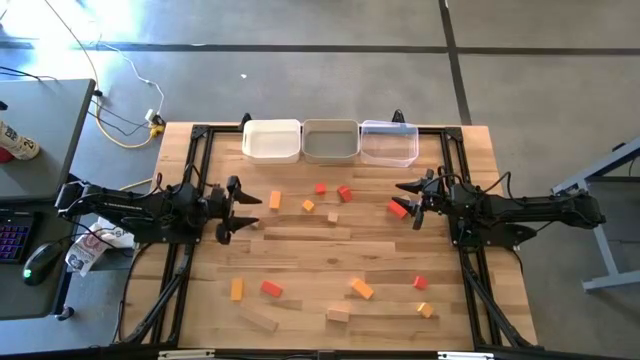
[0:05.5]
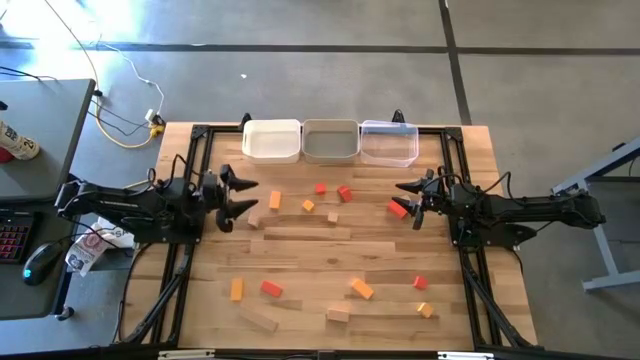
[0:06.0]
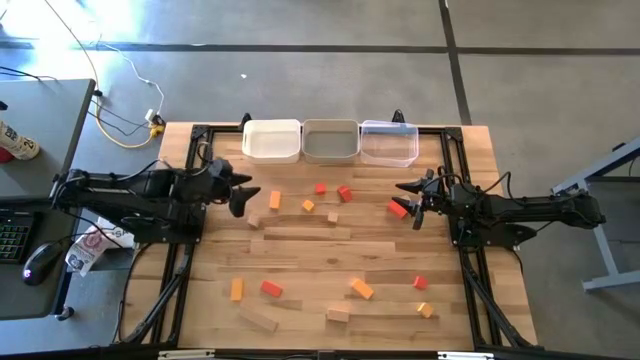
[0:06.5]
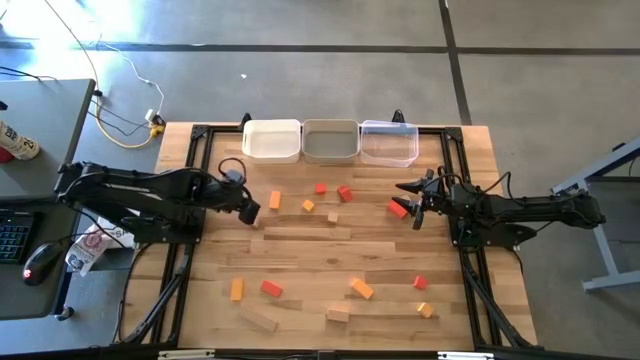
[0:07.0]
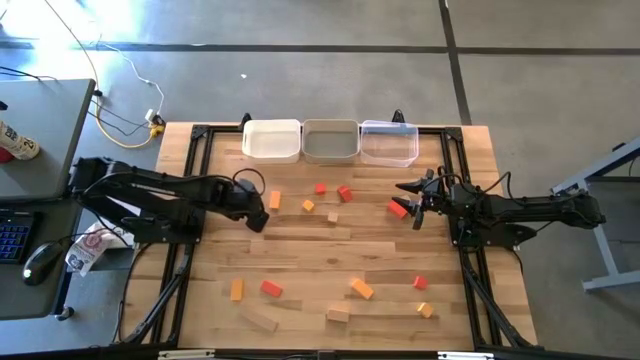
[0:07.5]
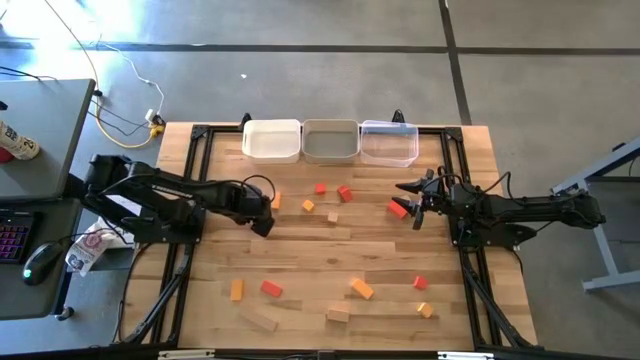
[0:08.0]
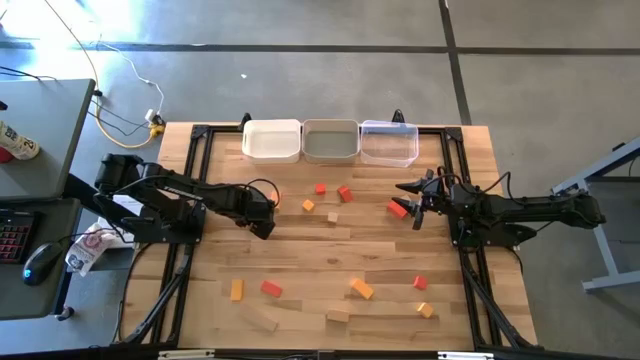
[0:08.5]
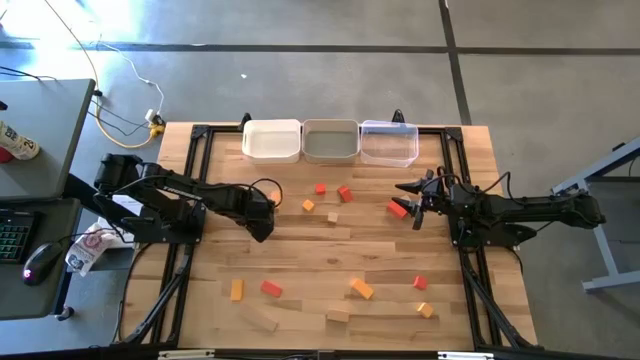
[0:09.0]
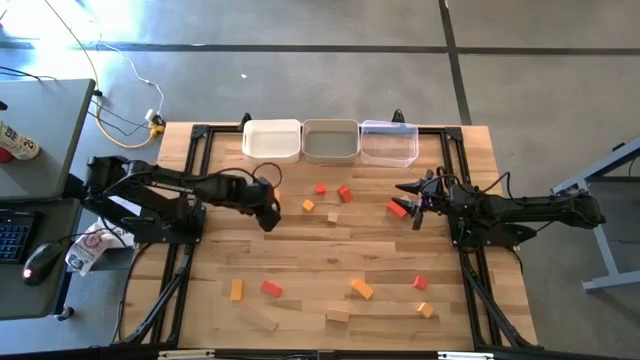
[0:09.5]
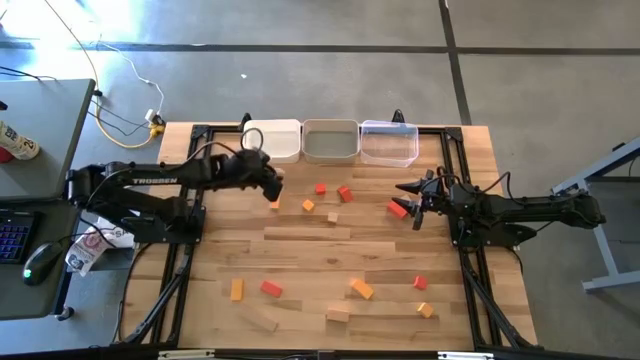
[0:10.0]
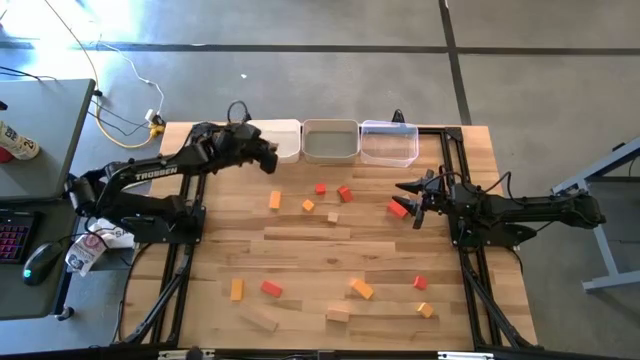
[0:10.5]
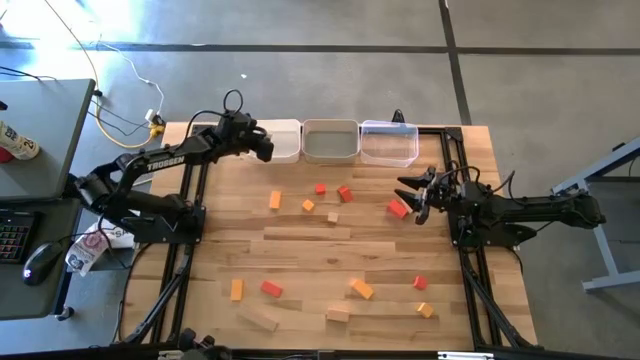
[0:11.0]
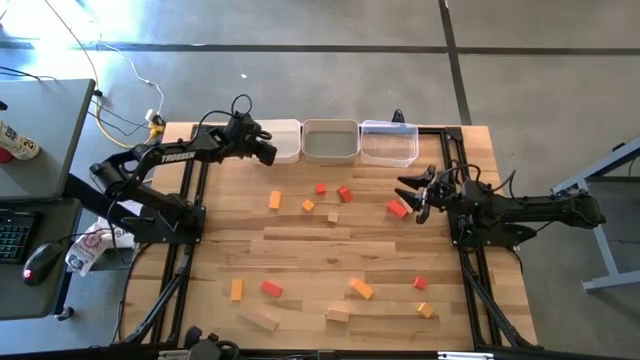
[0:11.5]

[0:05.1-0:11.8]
Task: Sort & place blocks by color
Put the brown block into the white bin

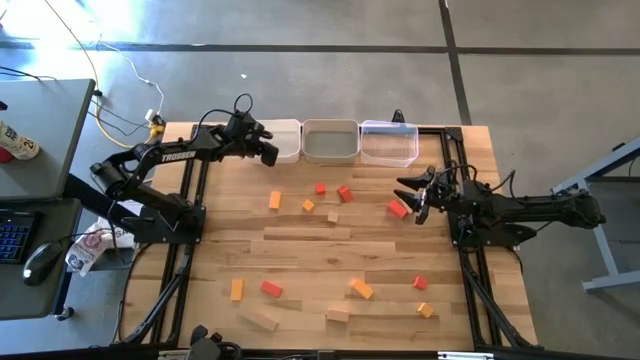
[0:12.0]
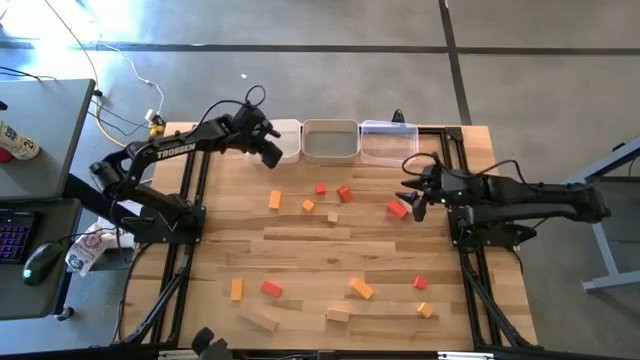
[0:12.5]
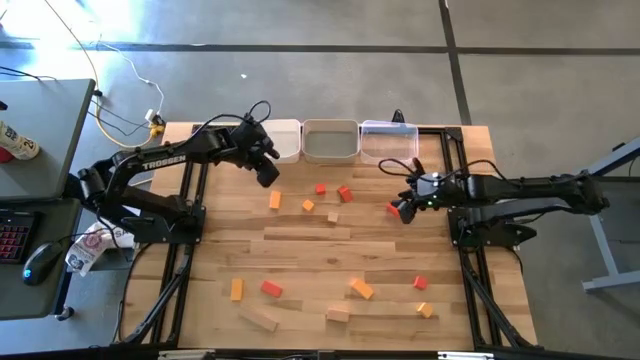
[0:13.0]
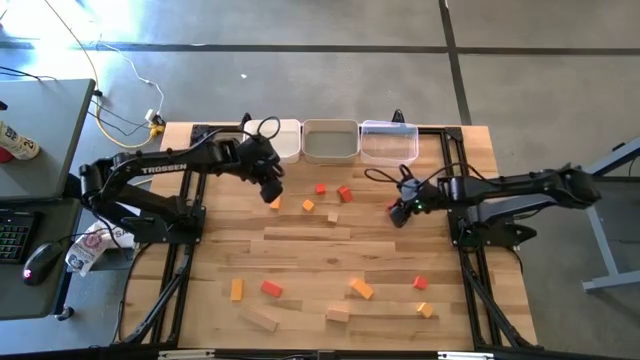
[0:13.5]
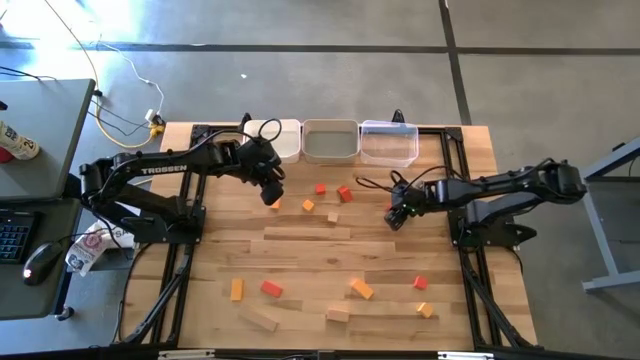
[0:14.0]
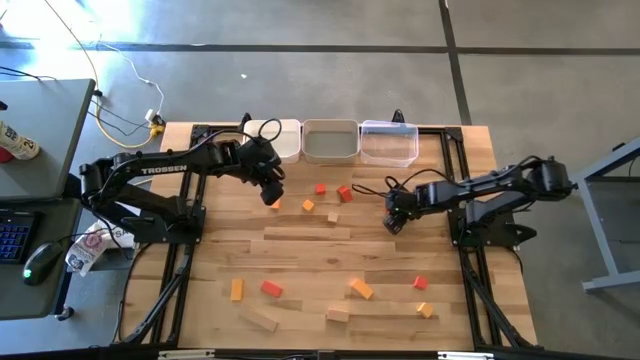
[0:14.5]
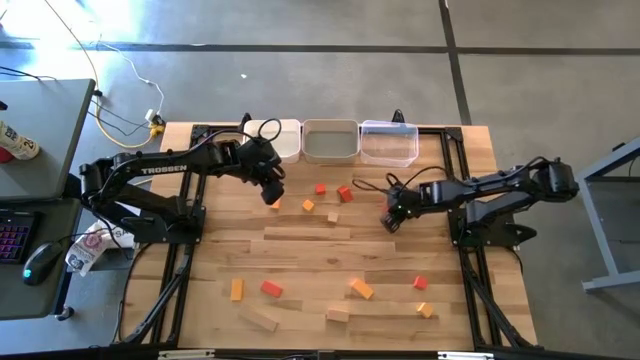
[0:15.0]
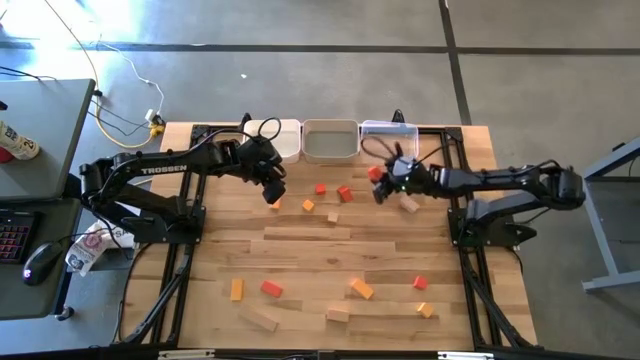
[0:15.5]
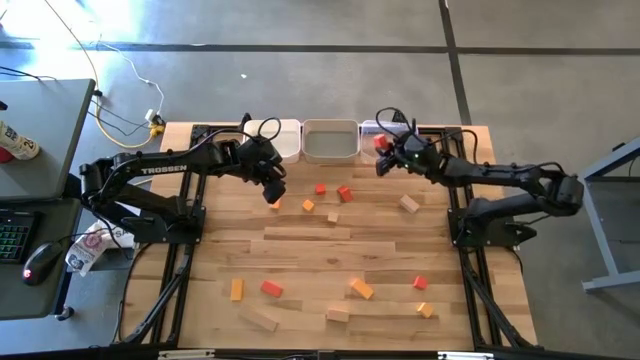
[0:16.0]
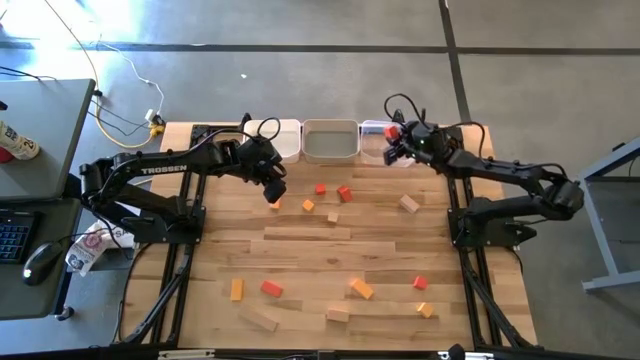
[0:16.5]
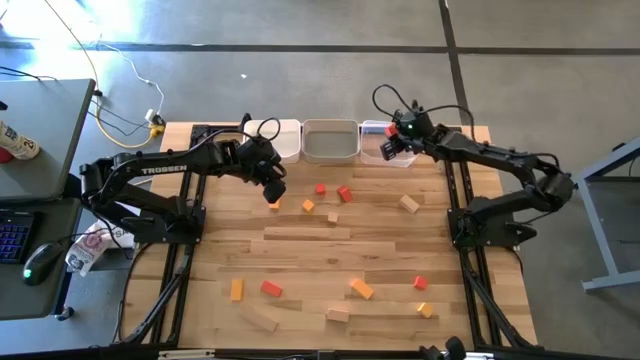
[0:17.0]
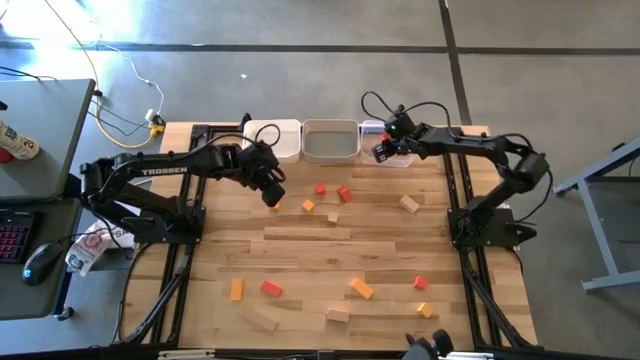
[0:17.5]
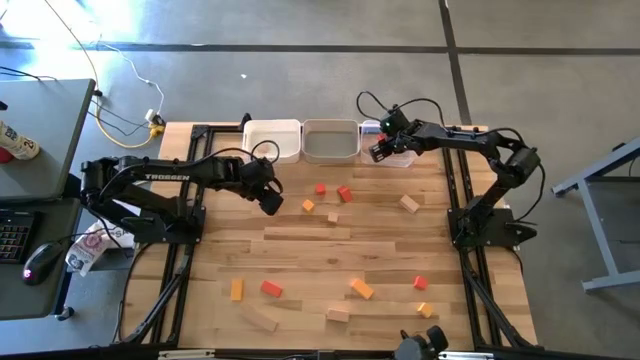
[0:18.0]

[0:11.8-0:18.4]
Put the orange block into the transparent bin

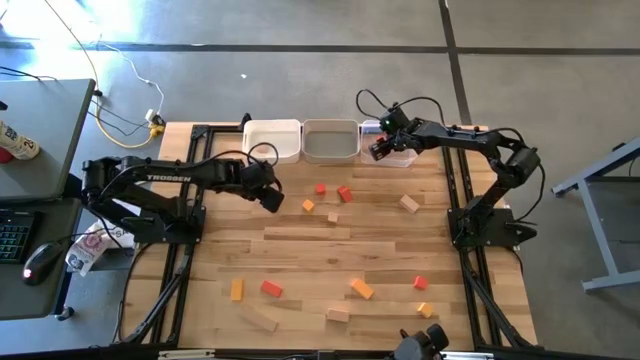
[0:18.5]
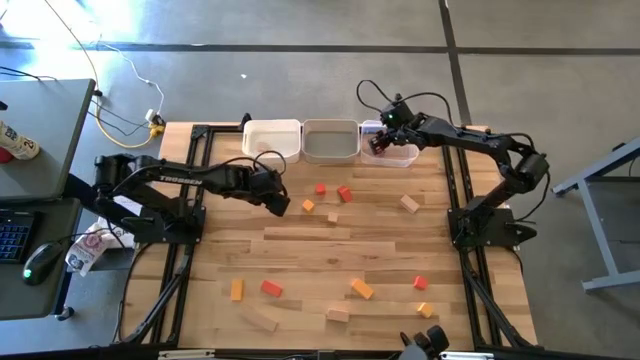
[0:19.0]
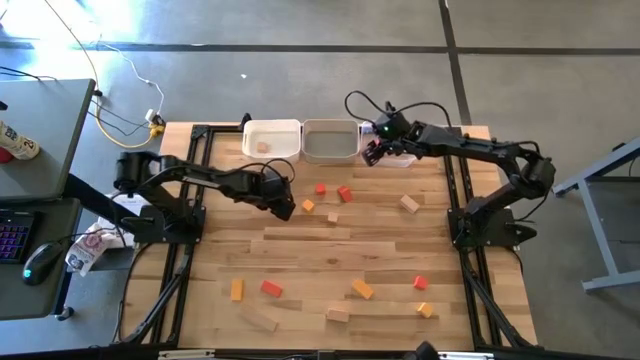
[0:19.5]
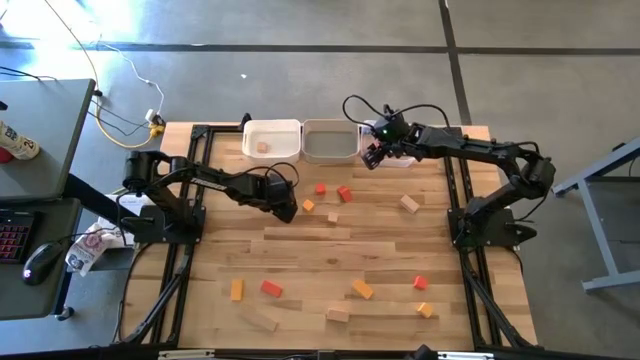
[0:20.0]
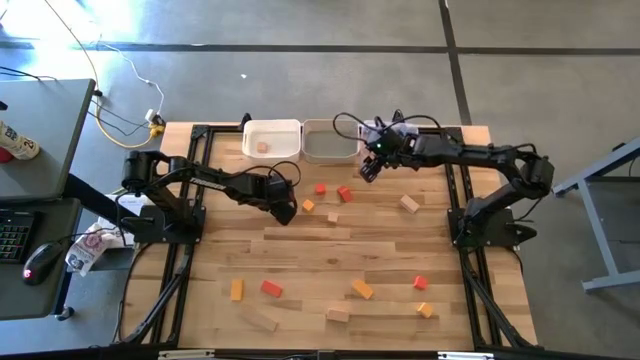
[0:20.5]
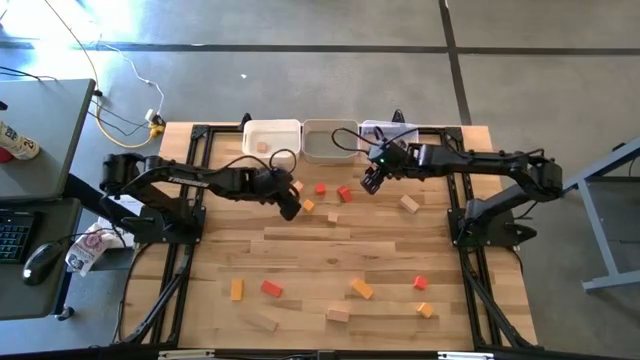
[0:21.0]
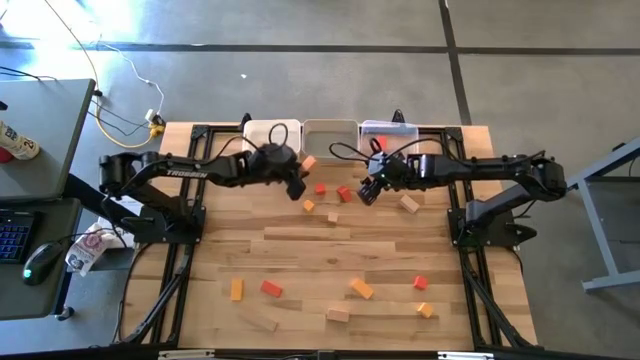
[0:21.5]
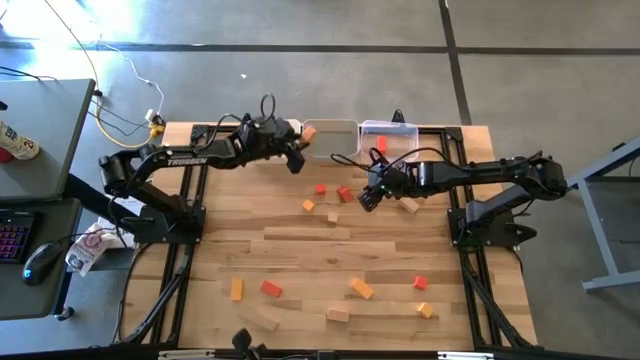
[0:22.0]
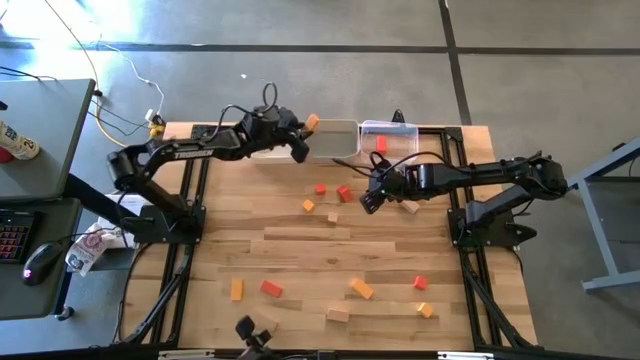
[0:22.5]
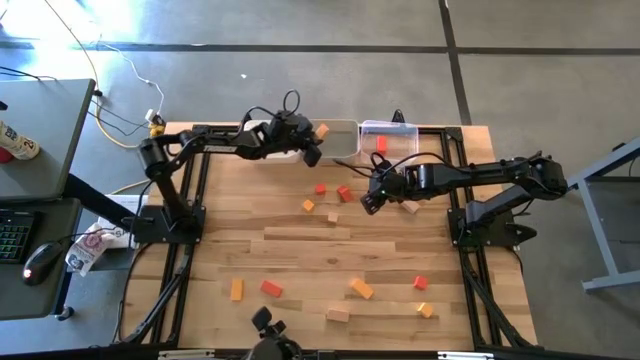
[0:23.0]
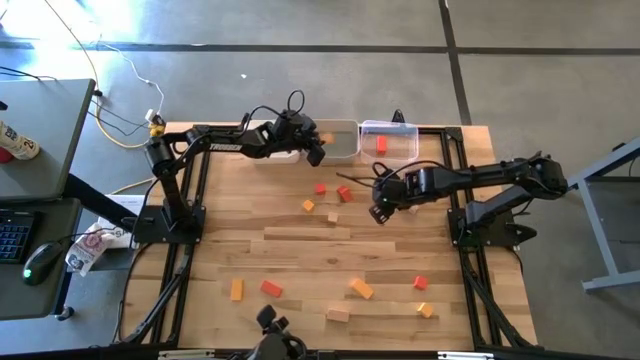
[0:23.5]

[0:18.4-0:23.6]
Put the yellow block into the gray bin

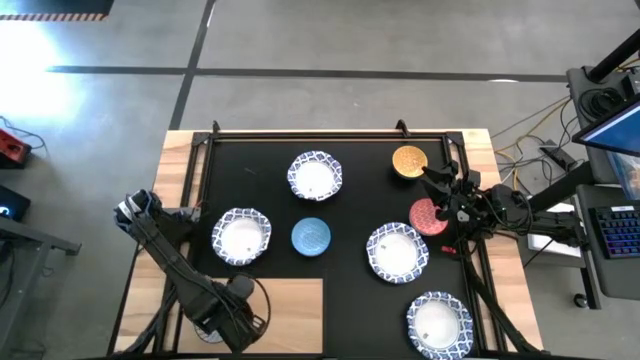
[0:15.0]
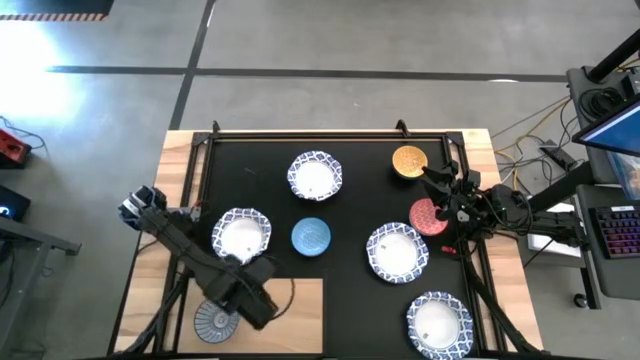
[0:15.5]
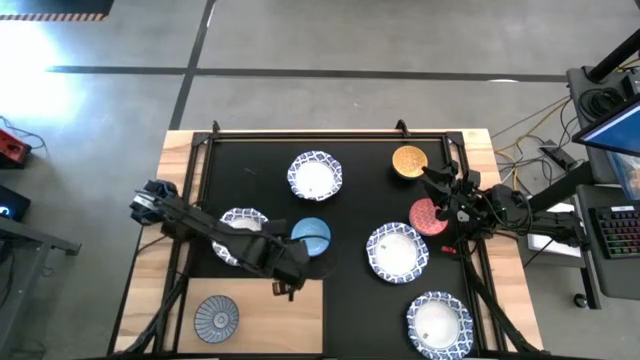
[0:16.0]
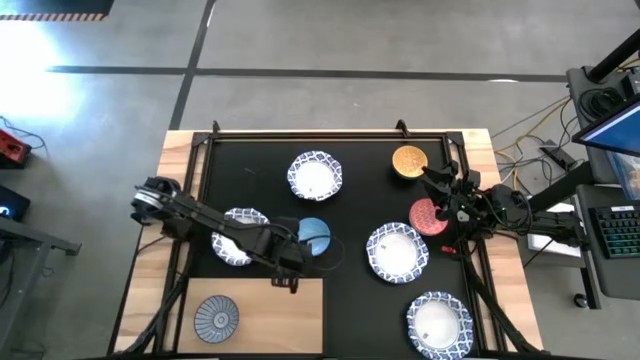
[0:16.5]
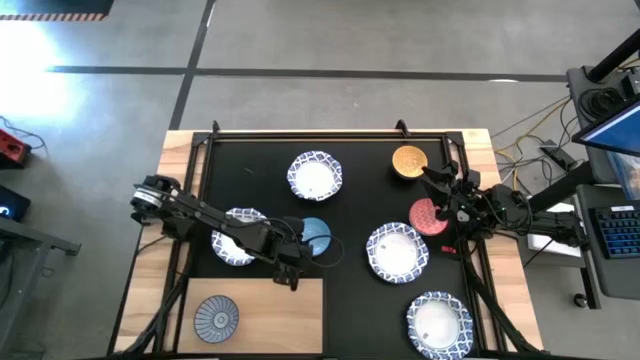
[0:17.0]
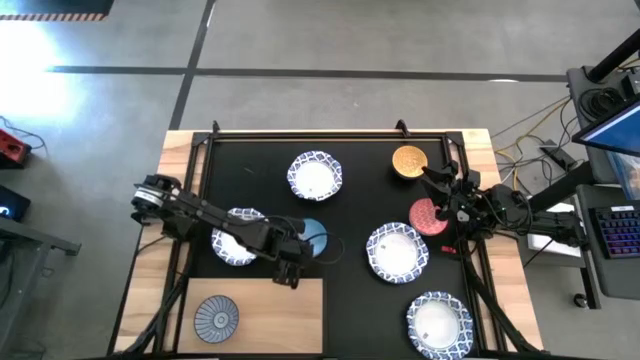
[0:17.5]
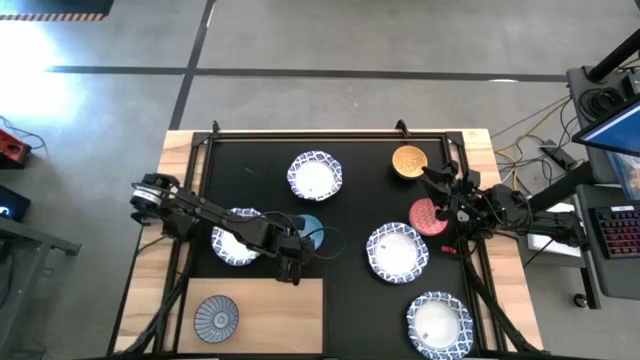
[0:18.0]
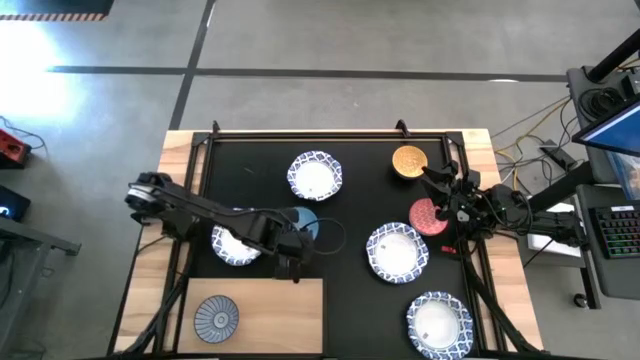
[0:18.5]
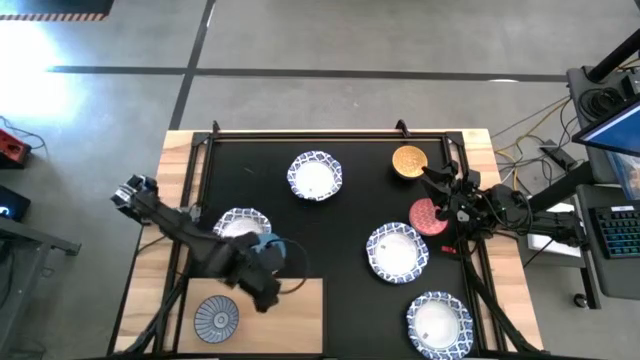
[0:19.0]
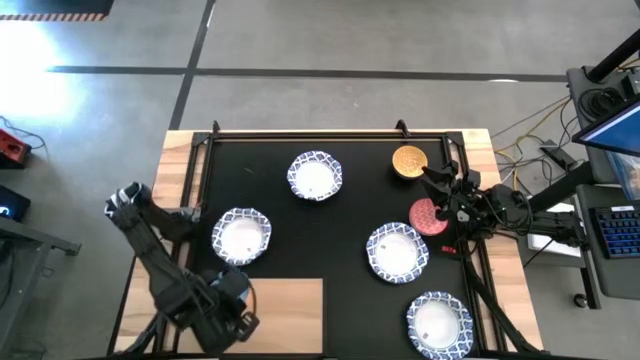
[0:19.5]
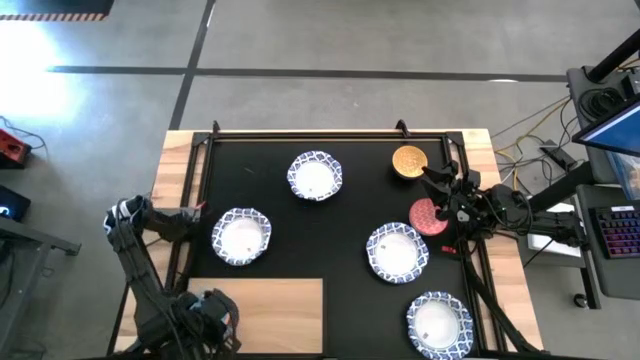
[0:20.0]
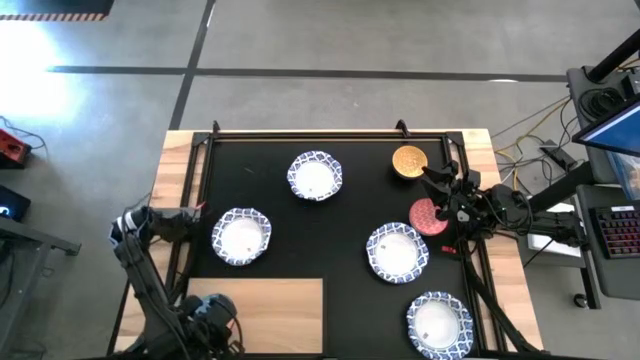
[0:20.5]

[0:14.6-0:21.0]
Task: Place and stack bowls onto a shelf
Stack the light blue patterned bowl on top of the dark blue patterned bowl on the shelf
